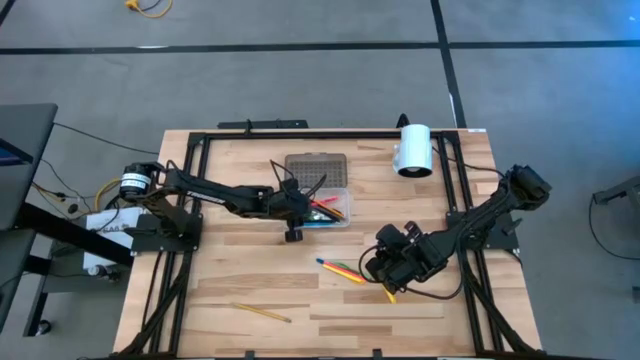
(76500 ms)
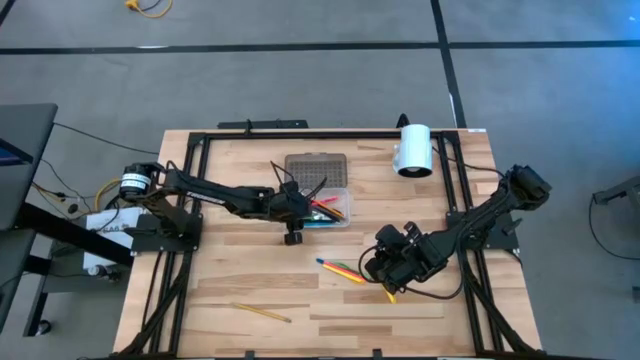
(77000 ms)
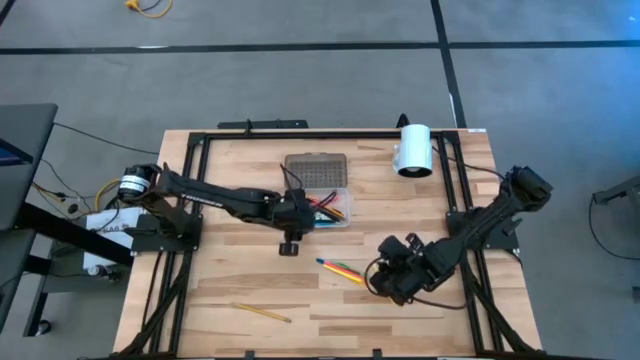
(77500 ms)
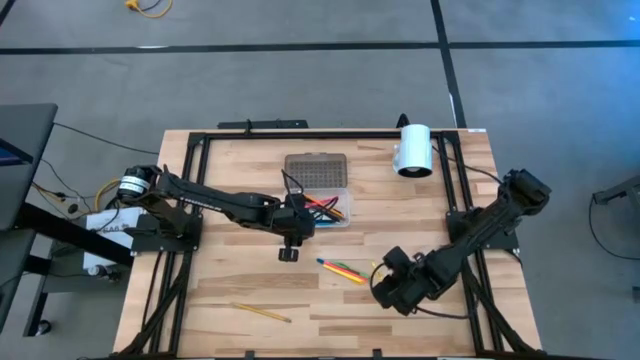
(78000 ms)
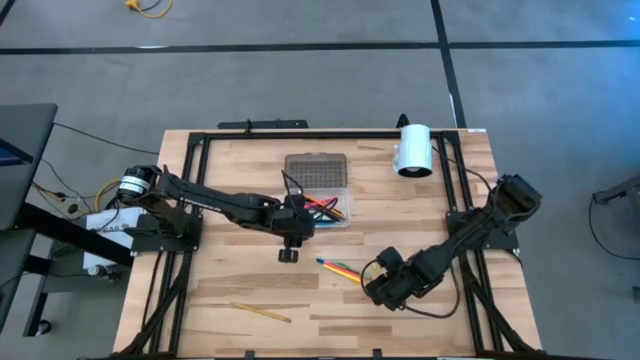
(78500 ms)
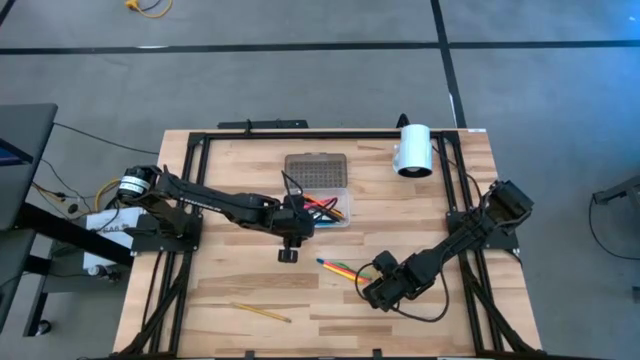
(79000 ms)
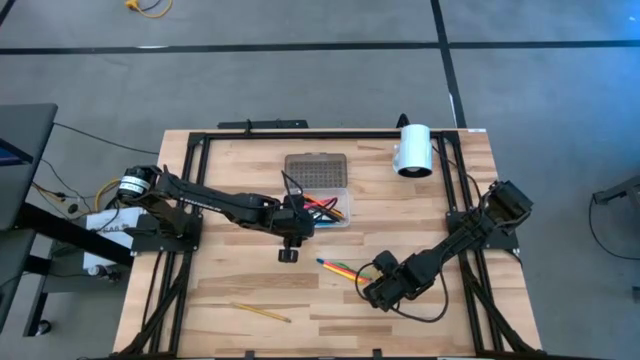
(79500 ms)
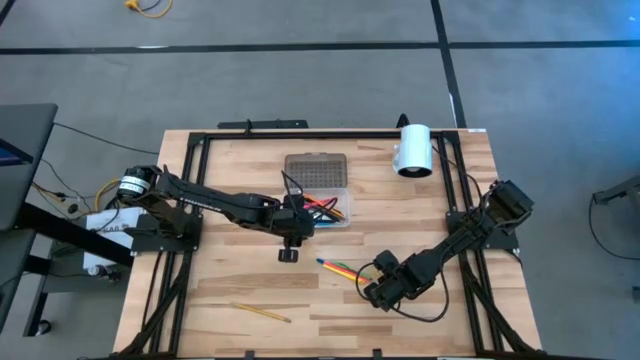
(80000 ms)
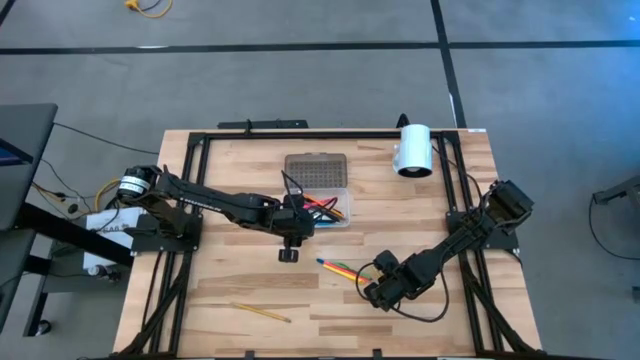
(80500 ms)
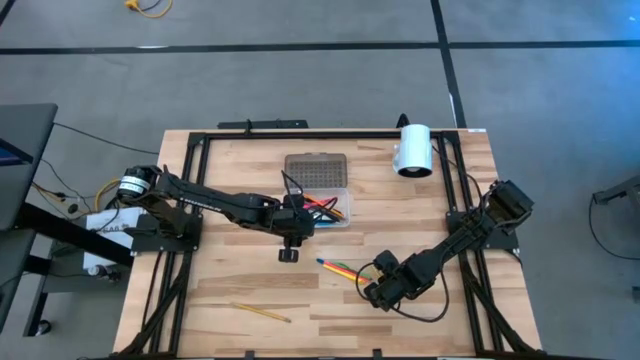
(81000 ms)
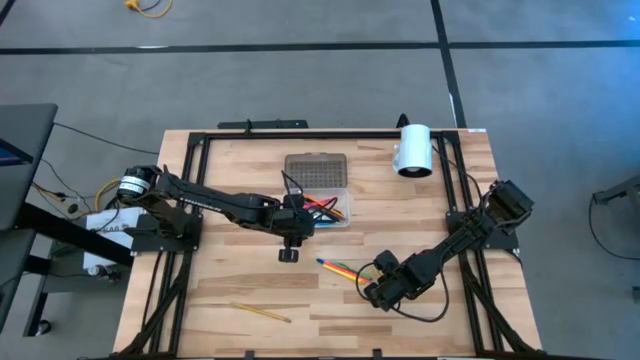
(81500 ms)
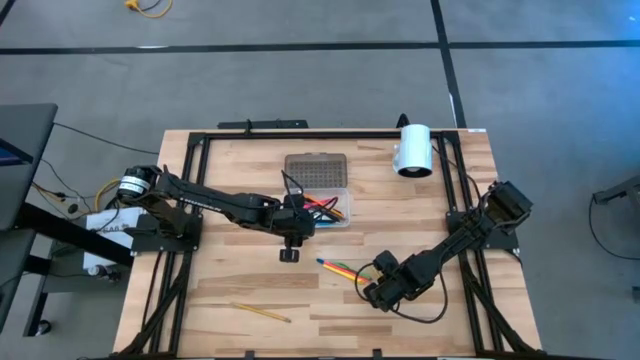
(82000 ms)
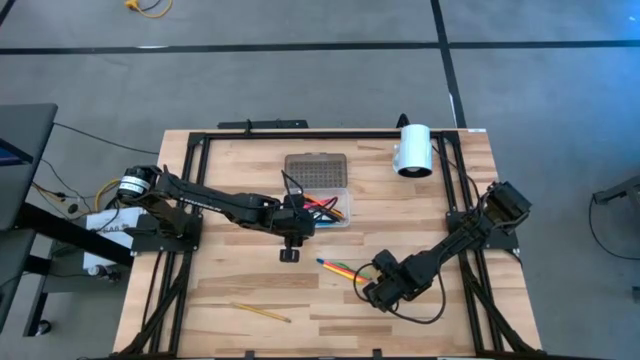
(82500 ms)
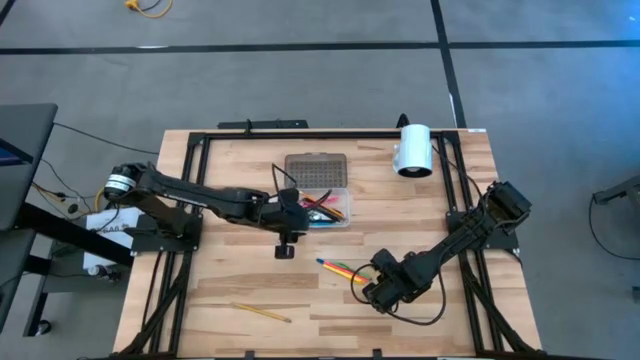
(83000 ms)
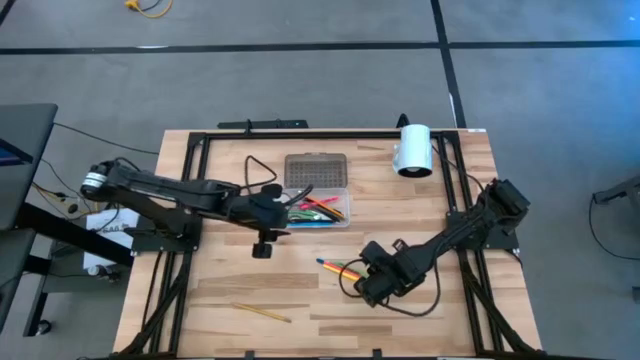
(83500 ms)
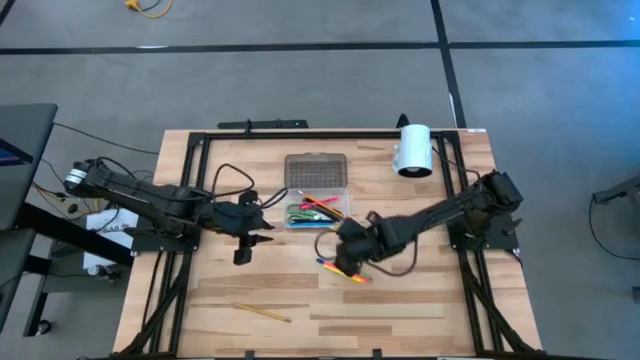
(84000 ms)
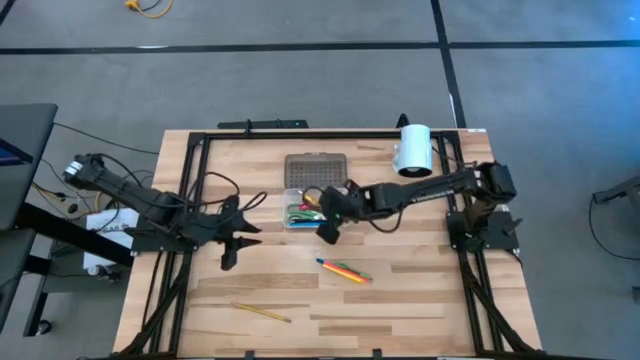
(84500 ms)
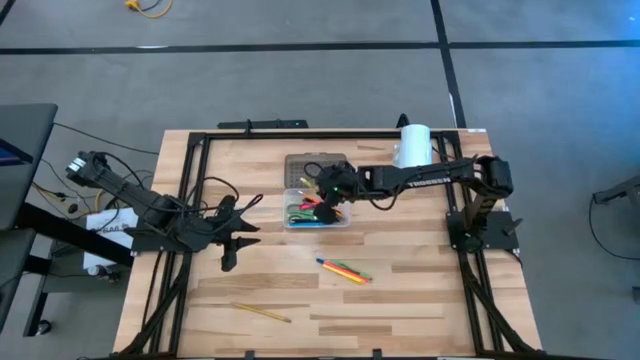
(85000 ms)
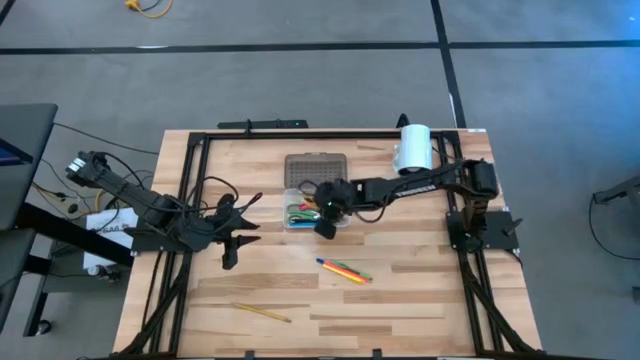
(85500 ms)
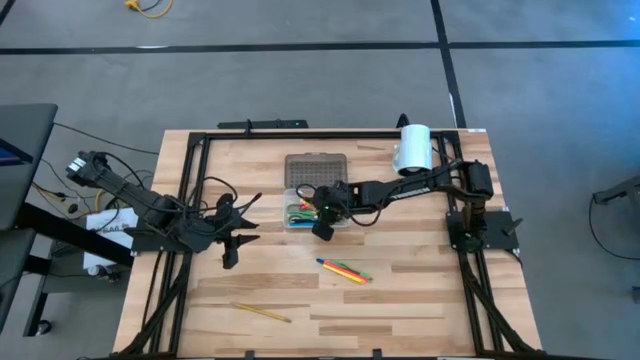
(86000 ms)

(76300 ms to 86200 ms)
Task: Pick & place school supplies into a supply box
Put the yellow pen into the supply box

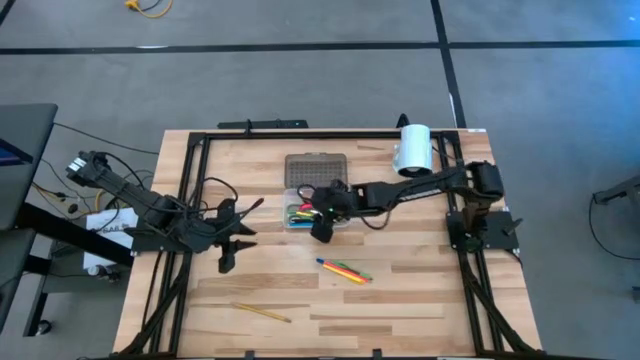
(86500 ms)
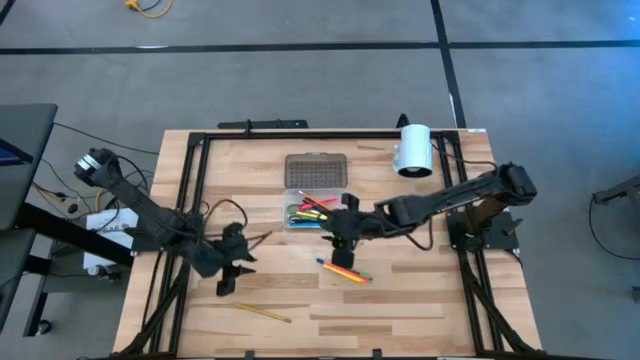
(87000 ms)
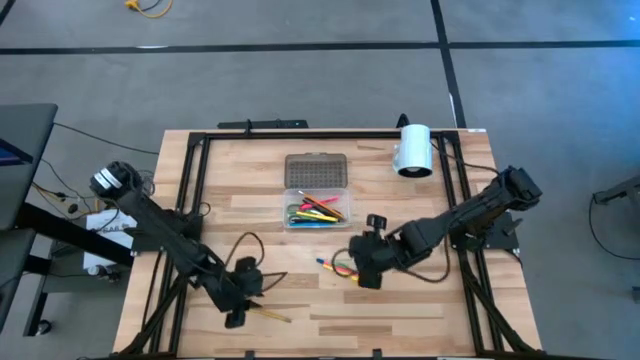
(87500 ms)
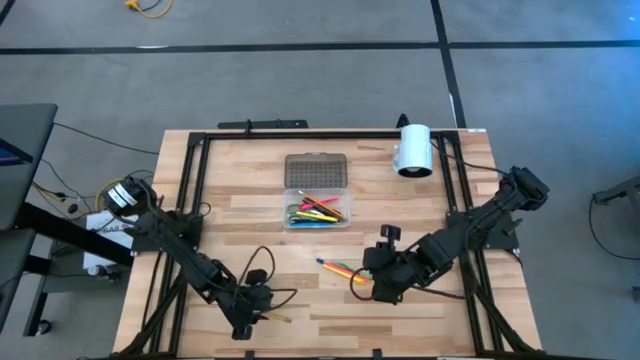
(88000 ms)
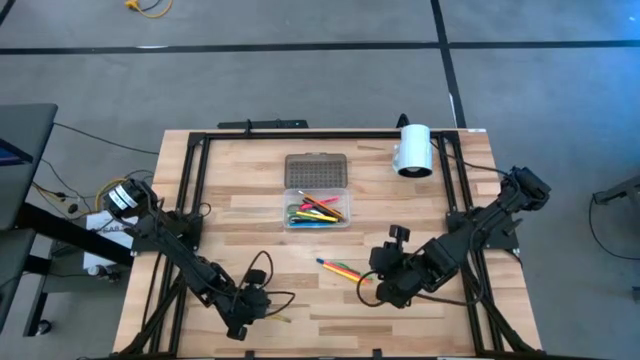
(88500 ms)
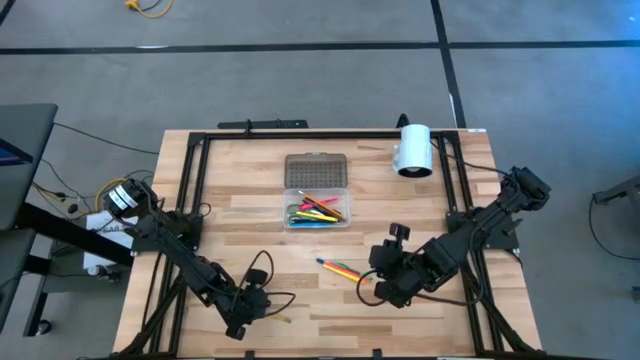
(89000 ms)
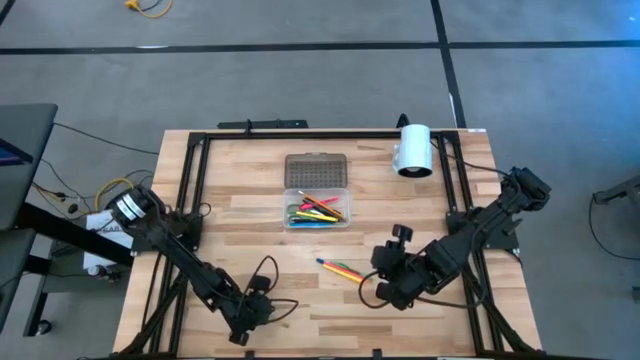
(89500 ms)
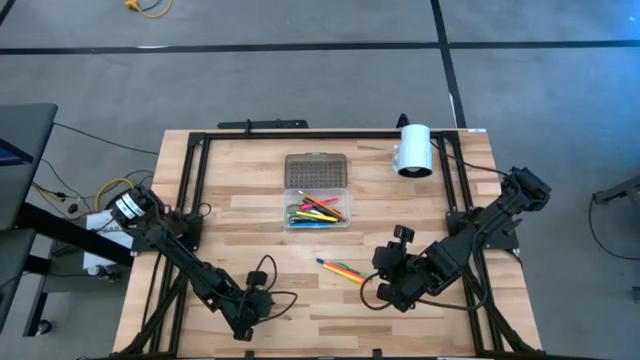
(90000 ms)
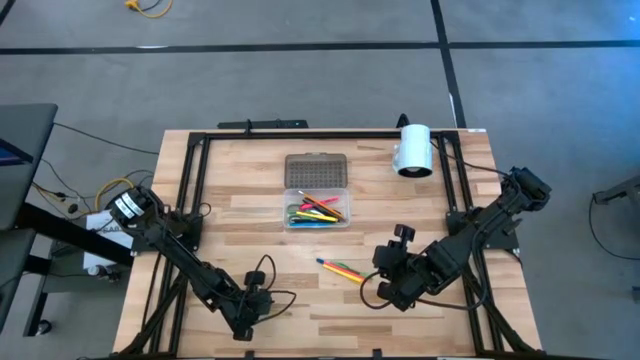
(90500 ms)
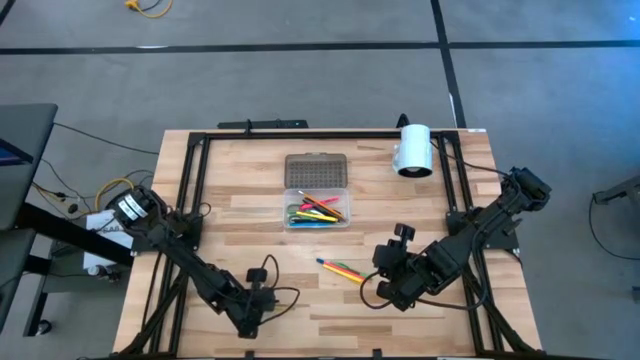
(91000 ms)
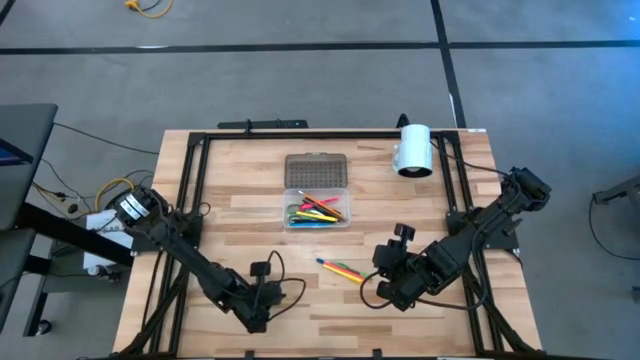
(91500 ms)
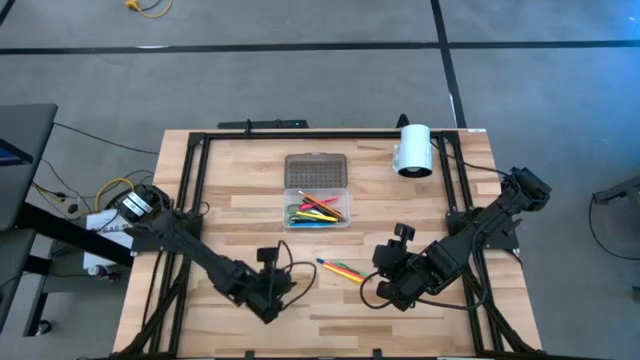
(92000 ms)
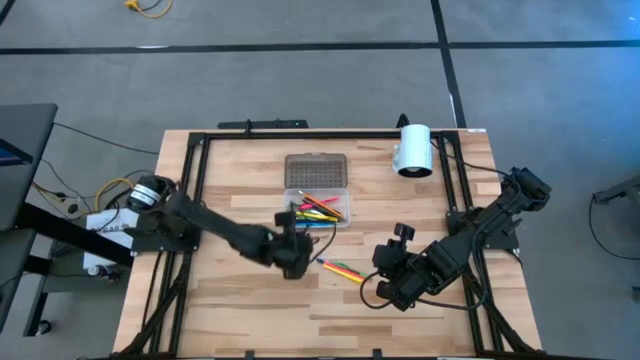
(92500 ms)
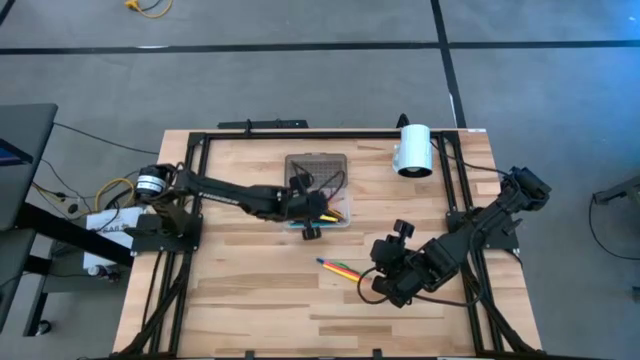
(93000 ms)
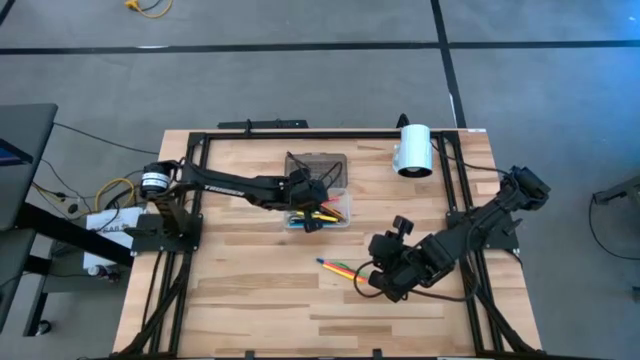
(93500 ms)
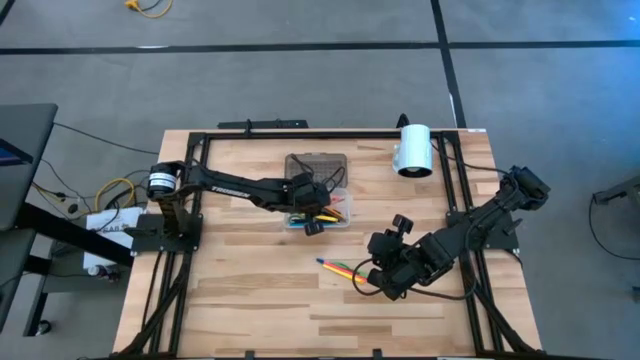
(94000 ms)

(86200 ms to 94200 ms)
Put the yellow pencil into the supply box

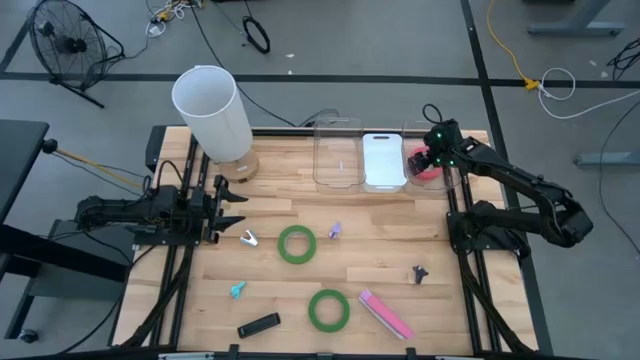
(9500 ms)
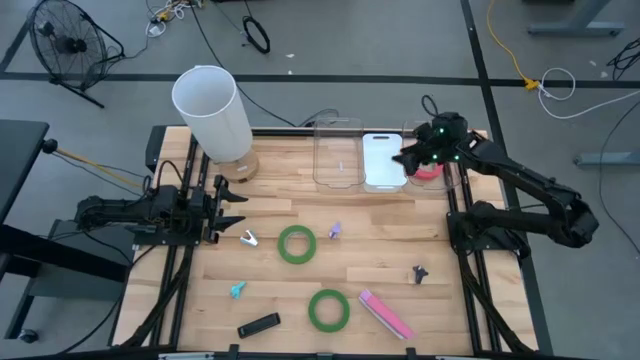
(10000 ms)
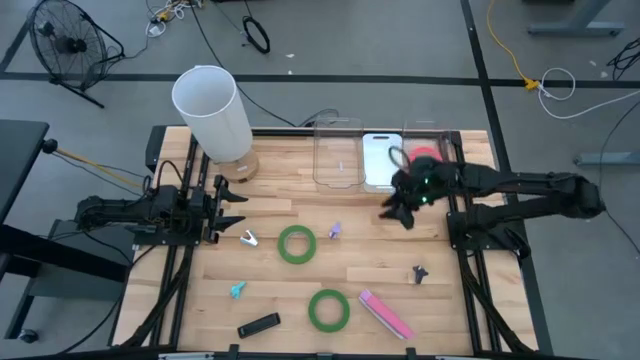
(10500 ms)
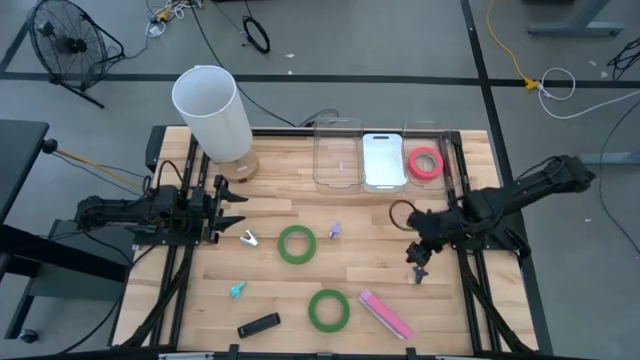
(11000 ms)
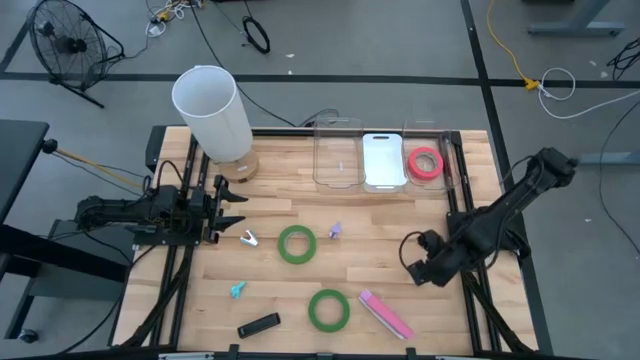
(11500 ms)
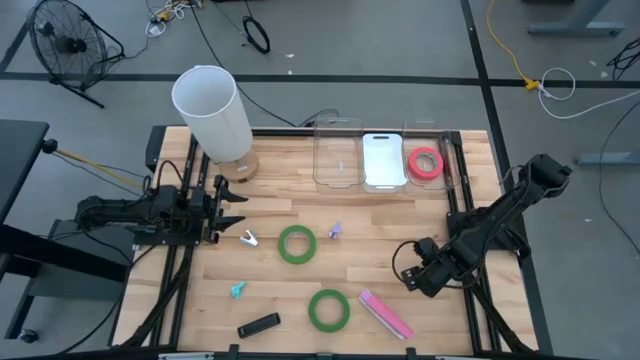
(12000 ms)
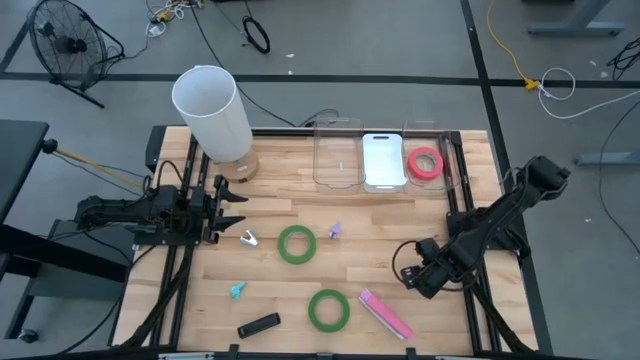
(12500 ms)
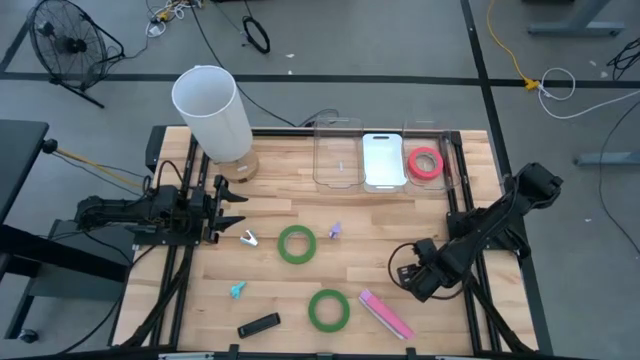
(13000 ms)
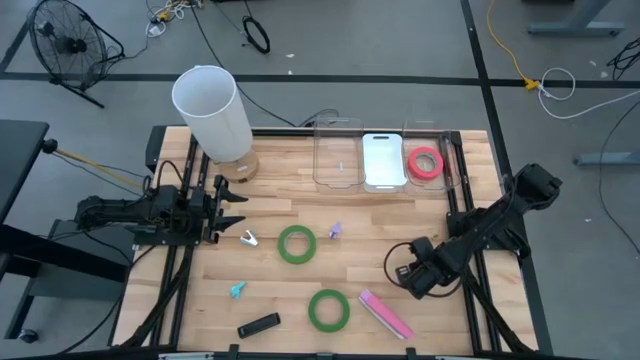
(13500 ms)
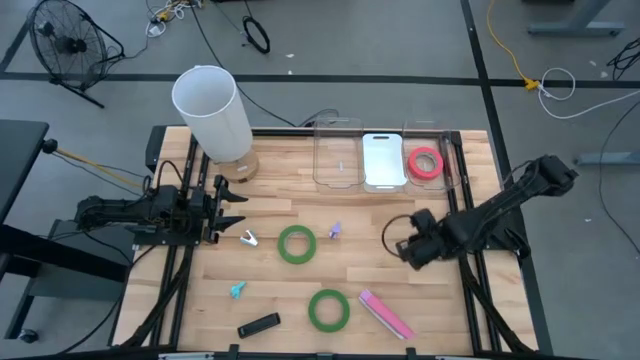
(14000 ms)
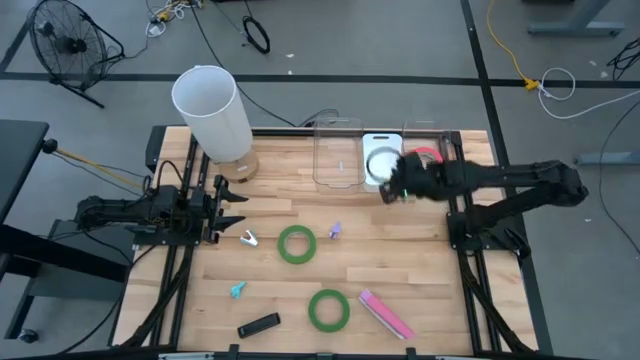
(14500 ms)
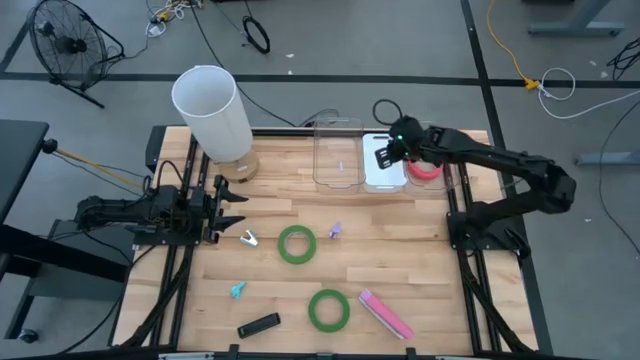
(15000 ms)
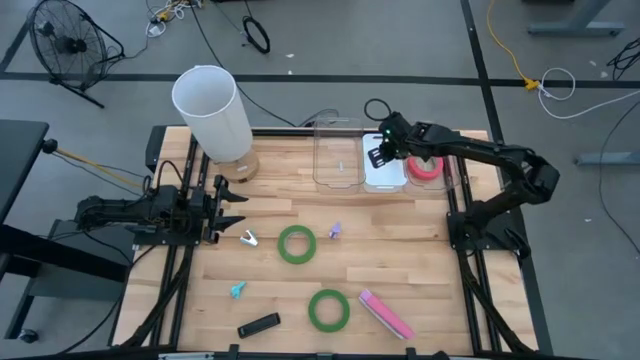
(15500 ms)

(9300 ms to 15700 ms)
Task: Pick and place Stapler, Stapler remover, tape
Put the black staple remover into the white bin
